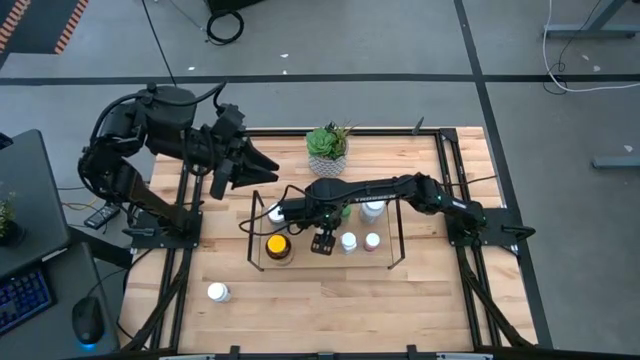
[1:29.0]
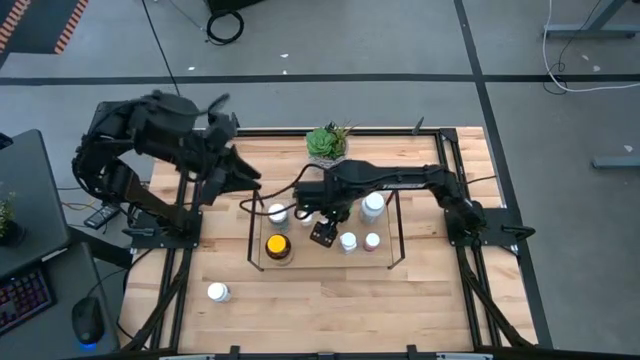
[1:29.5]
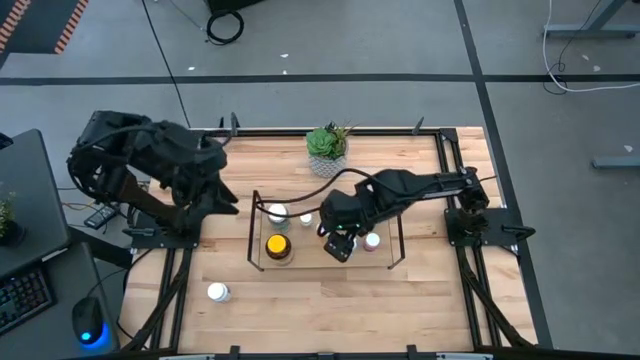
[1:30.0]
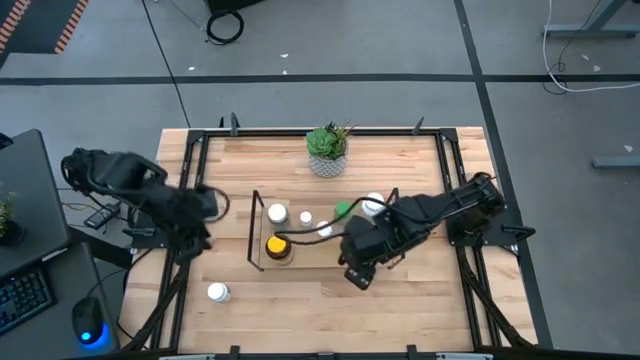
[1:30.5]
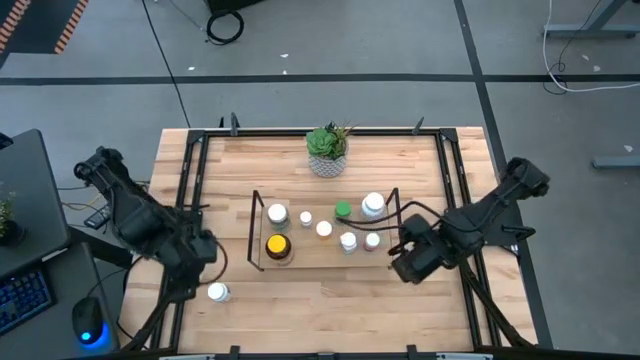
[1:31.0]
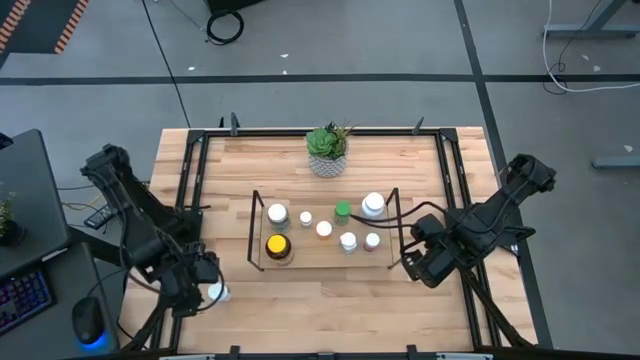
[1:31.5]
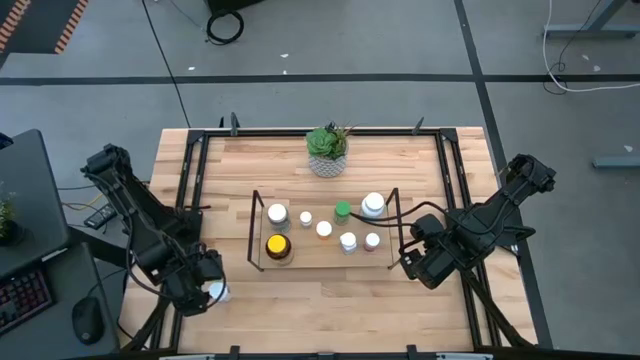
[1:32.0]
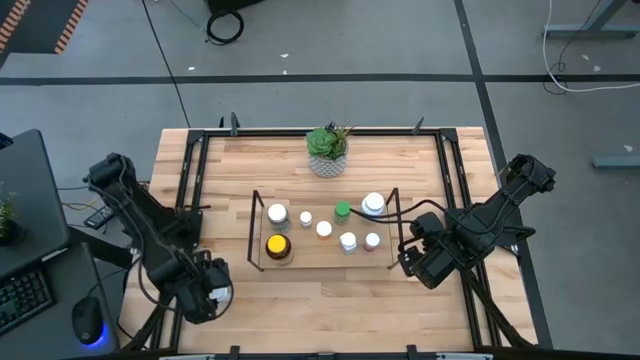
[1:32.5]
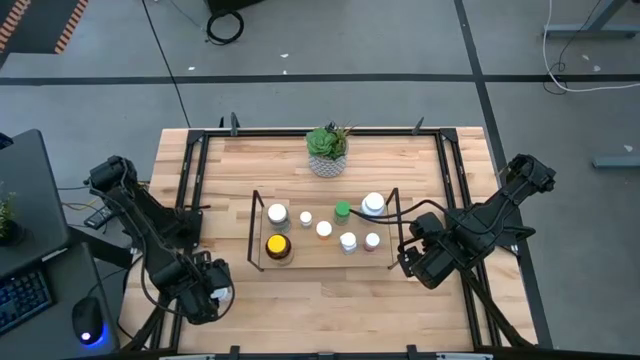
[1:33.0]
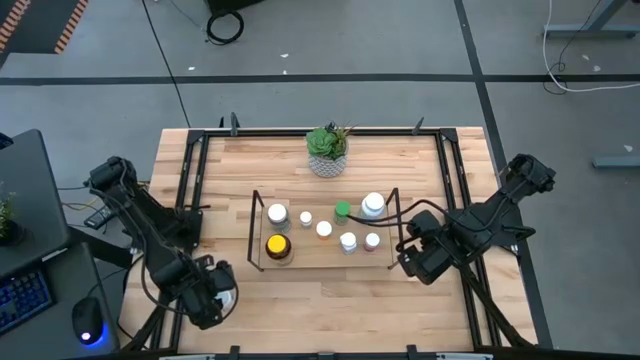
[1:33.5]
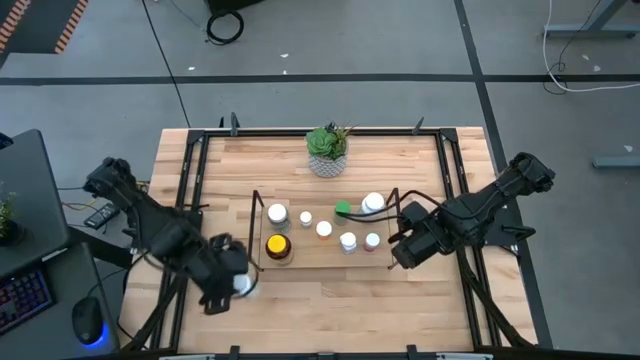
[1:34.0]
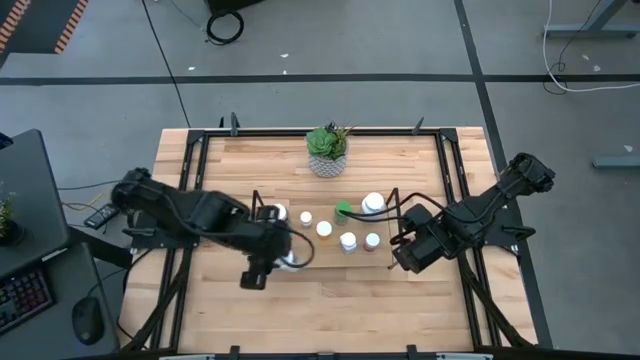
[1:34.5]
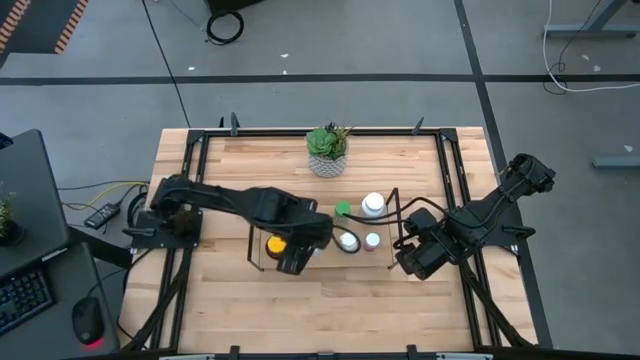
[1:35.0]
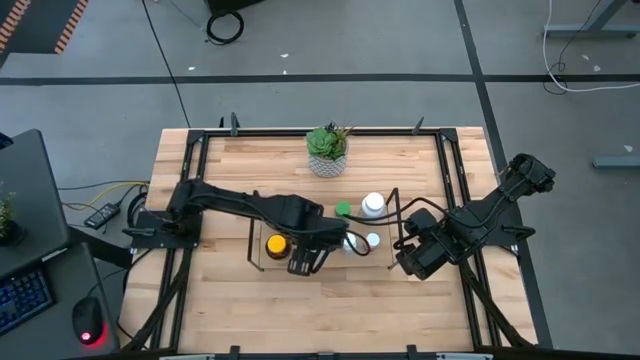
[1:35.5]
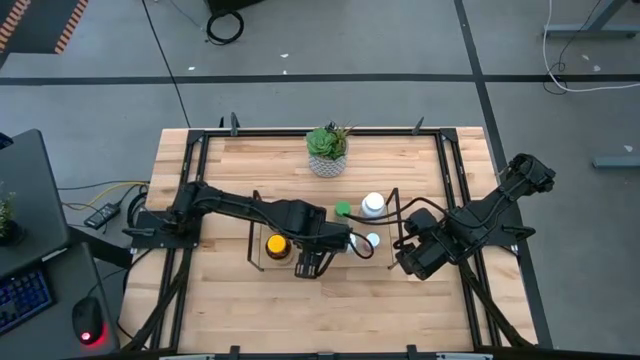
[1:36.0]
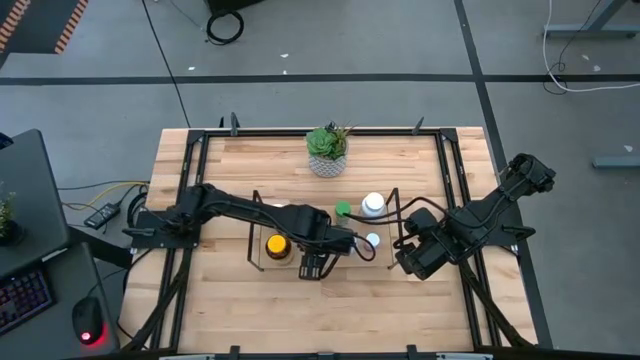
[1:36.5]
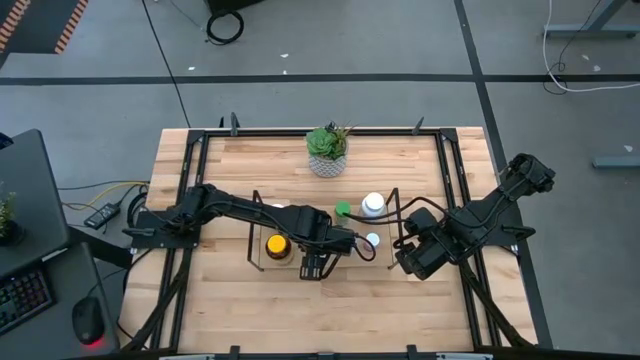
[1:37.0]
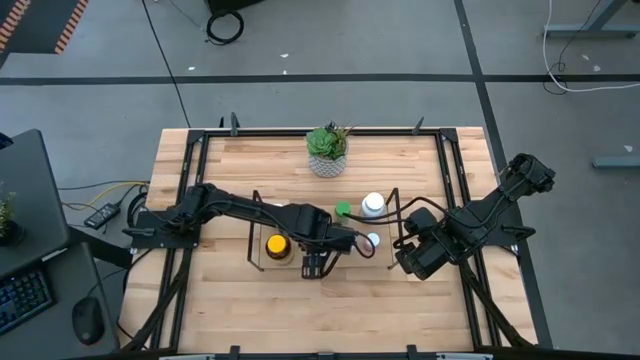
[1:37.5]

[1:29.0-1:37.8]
Task: Pick and place medicine bottles onto shelf by color
Put the small white medicine bottle on the shelf

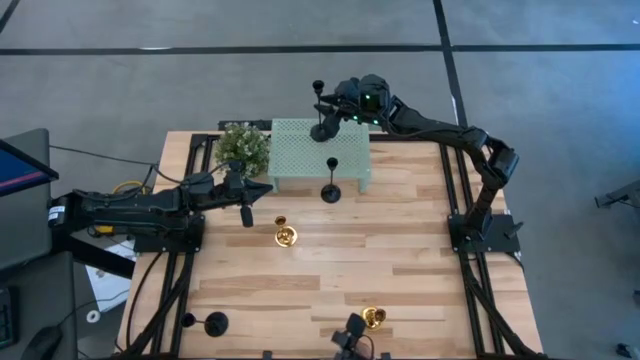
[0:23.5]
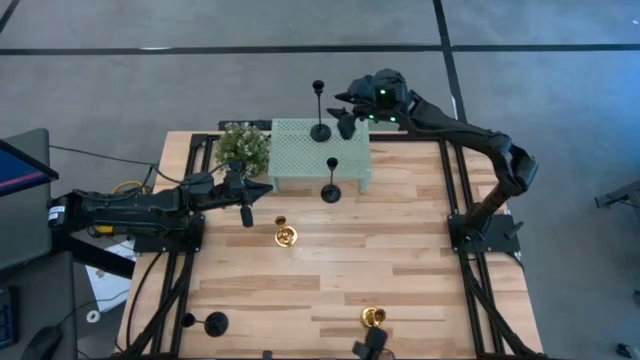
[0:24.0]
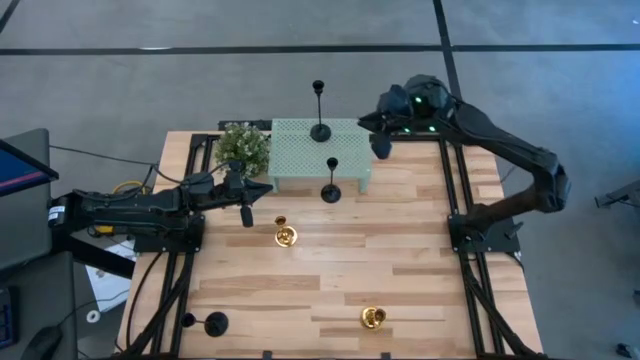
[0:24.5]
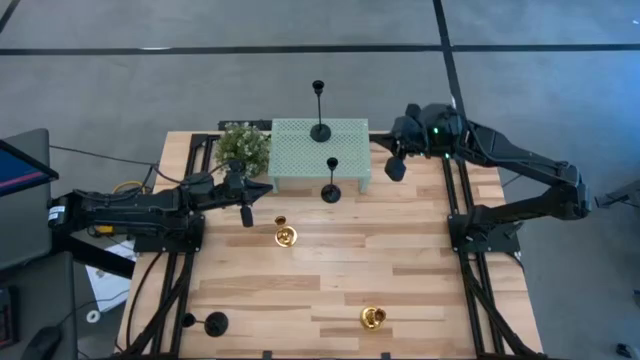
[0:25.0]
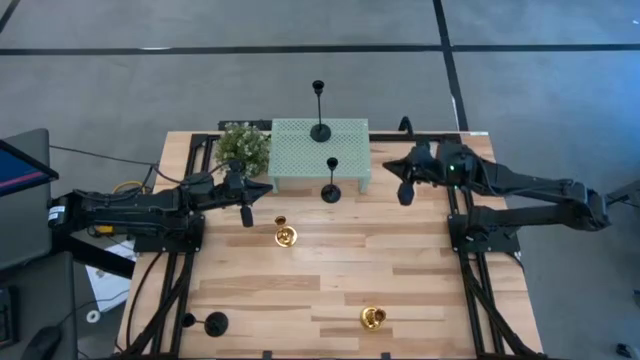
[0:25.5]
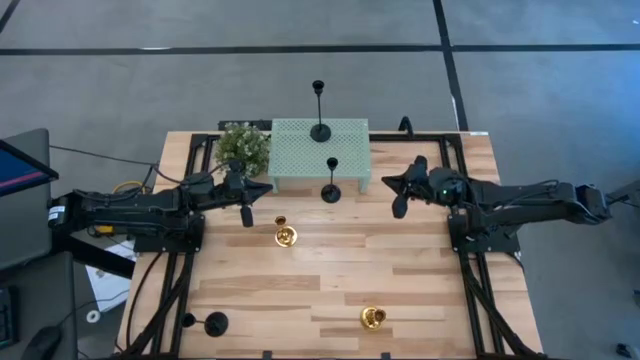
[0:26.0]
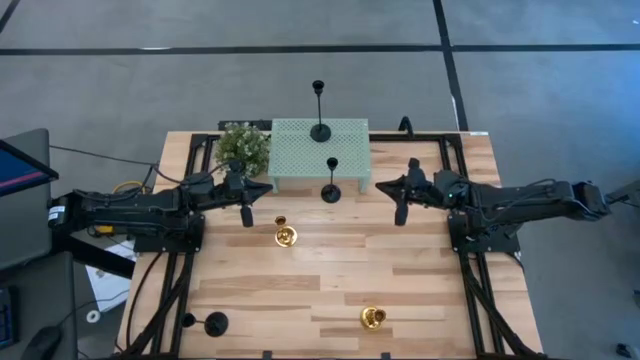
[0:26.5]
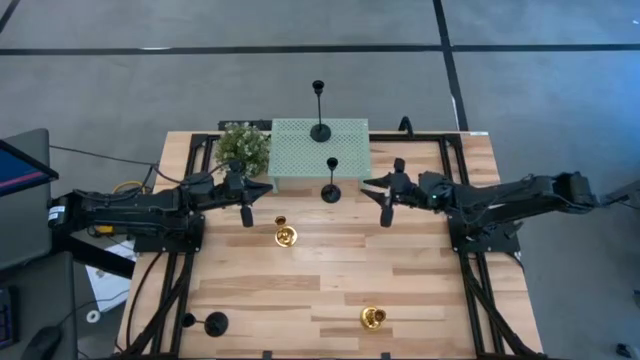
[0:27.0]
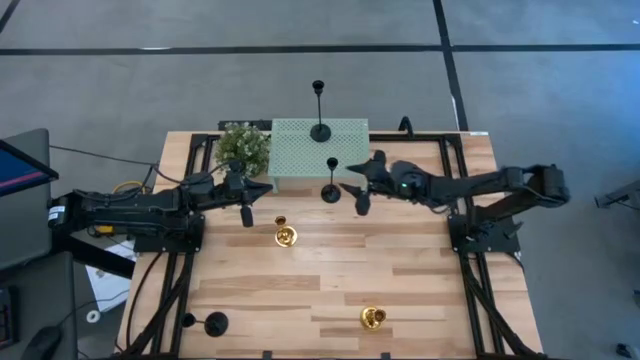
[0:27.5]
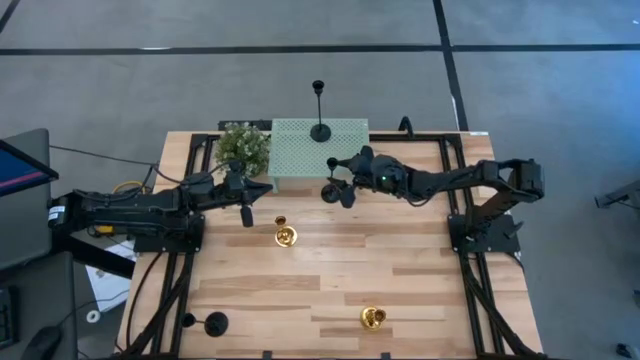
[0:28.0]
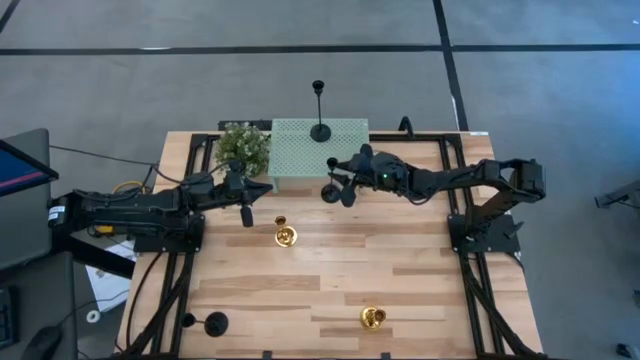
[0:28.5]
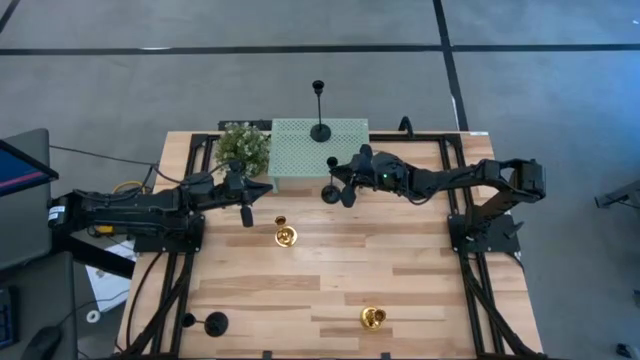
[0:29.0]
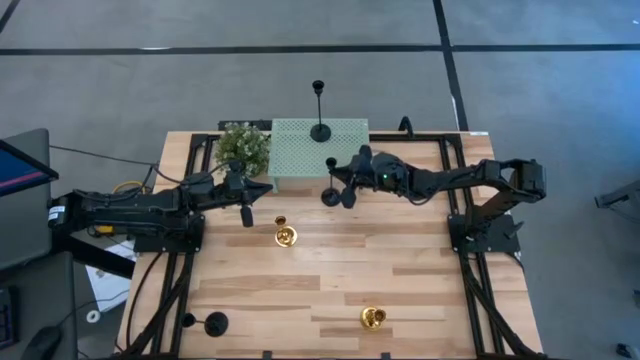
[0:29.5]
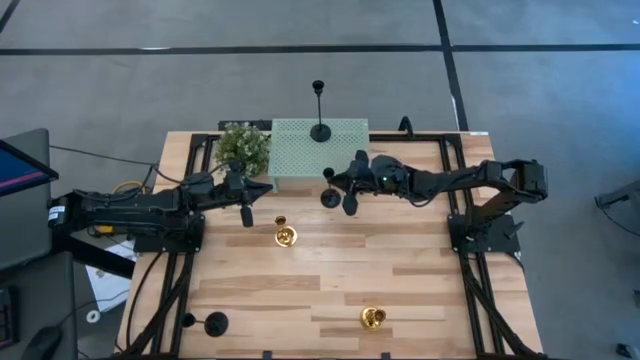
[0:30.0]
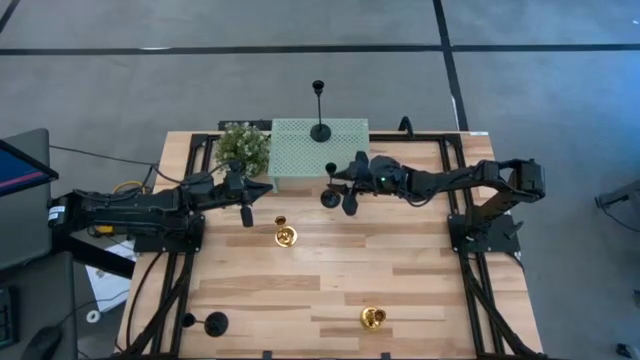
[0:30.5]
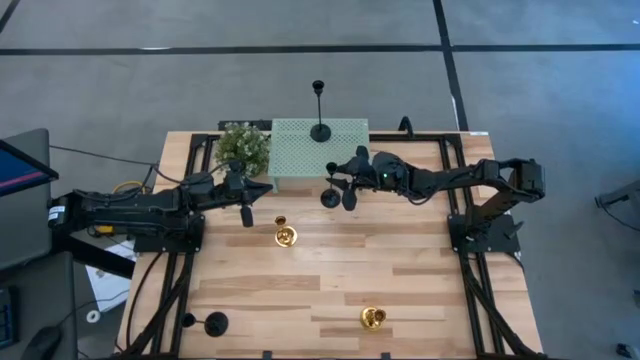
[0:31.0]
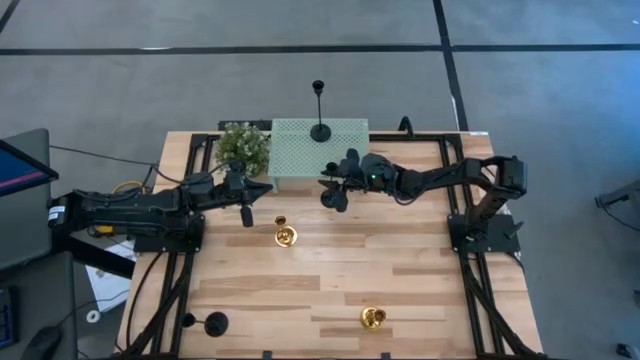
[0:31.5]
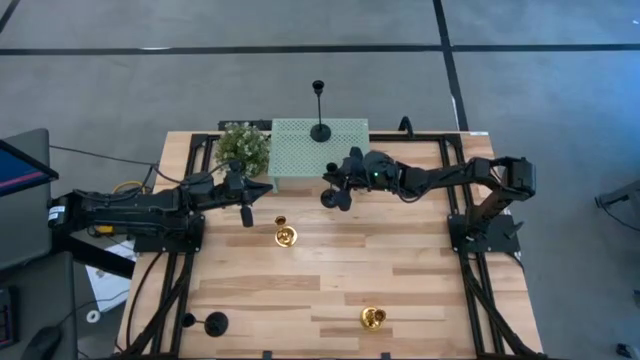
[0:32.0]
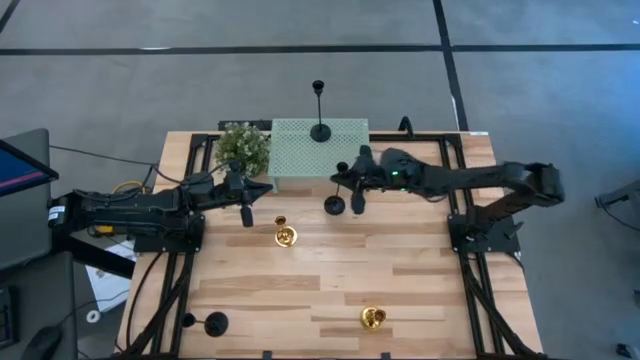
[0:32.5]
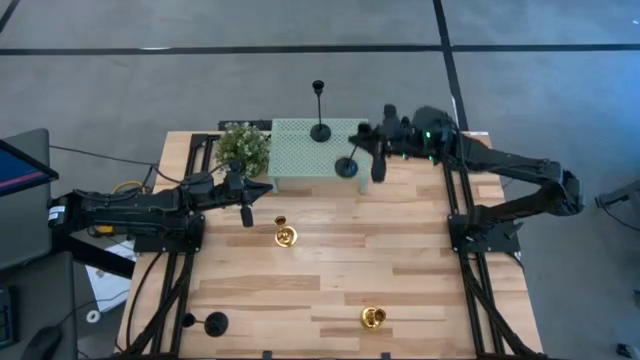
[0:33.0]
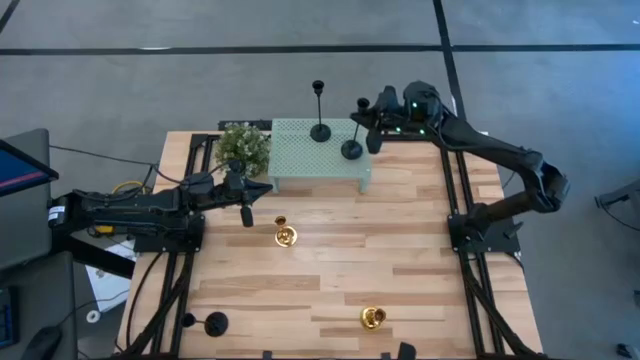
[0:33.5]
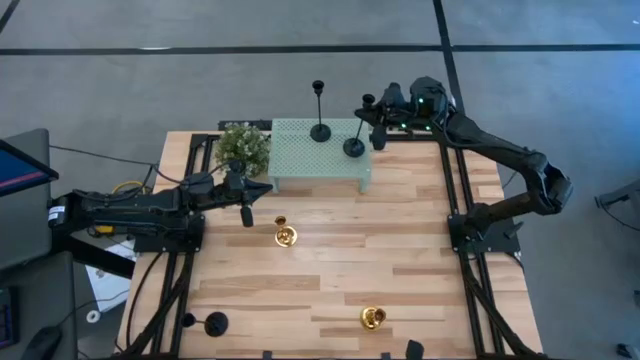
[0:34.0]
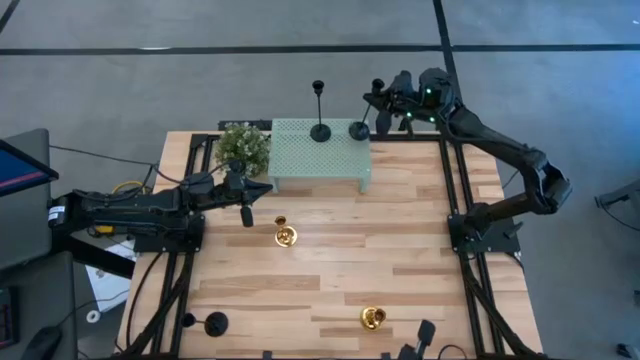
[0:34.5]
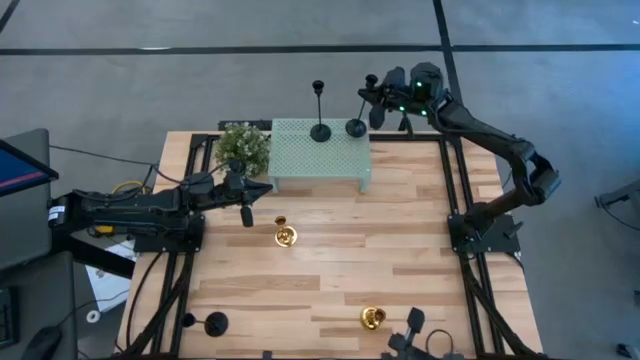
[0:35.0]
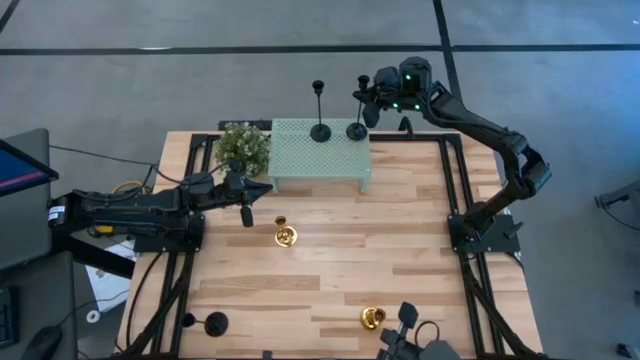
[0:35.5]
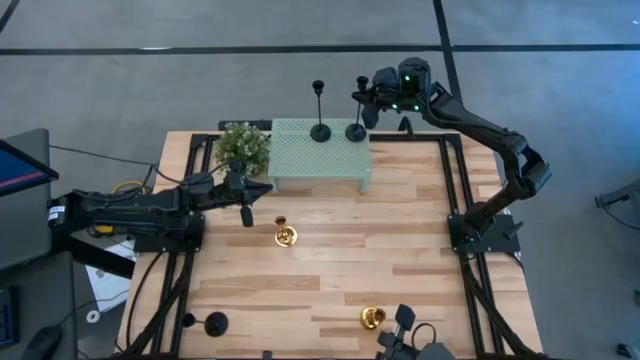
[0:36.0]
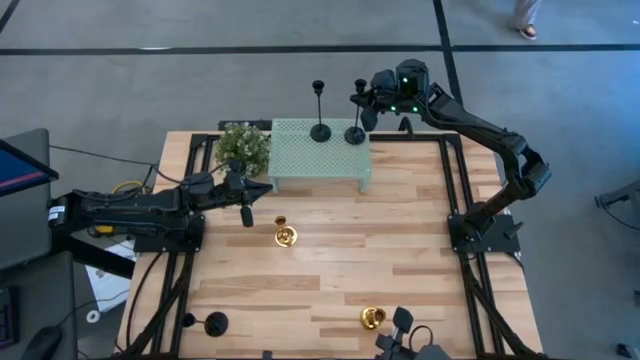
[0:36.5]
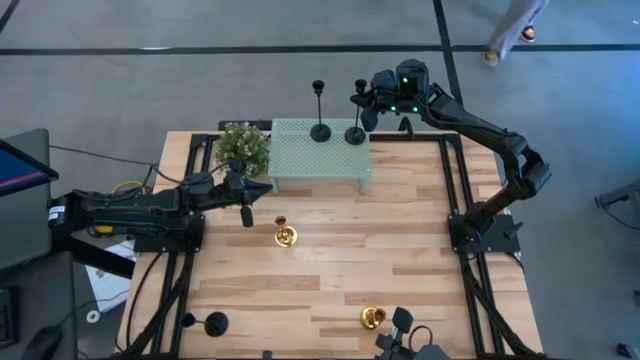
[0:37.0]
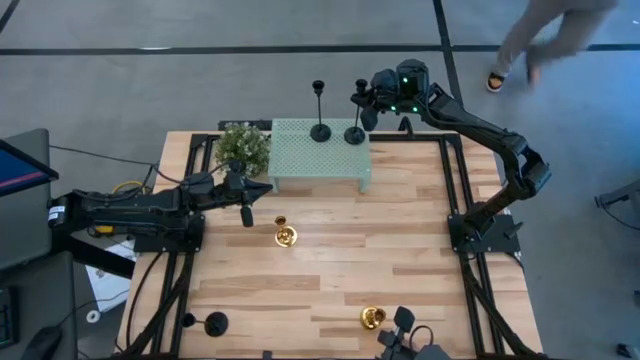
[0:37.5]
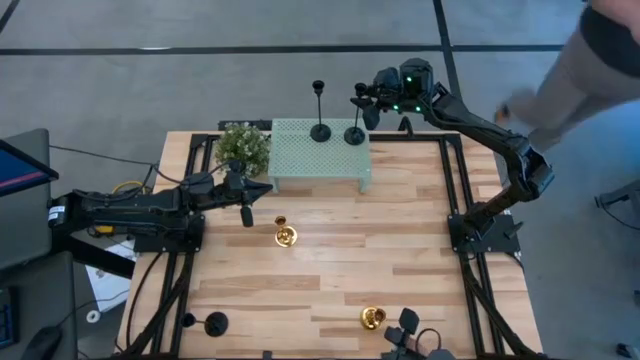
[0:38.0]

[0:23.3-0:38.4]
Task: Pick & Place candle stick holders
Put the top black candle holder on the shelf
